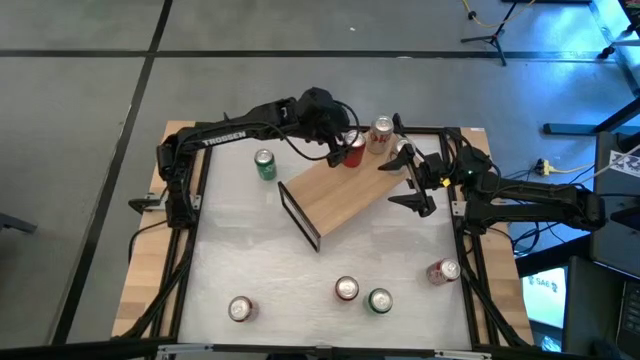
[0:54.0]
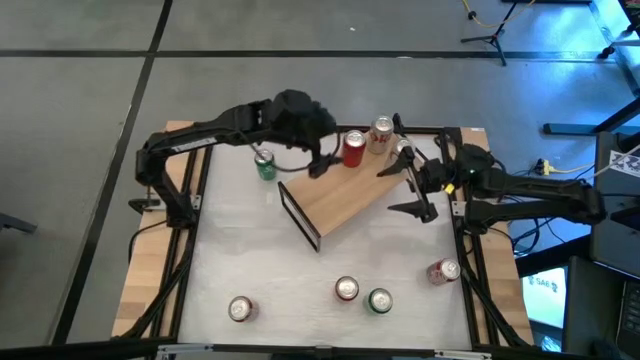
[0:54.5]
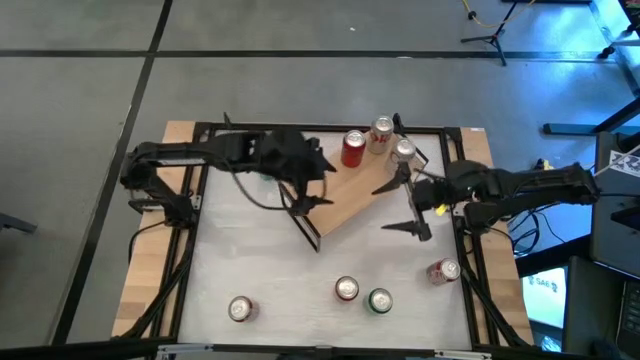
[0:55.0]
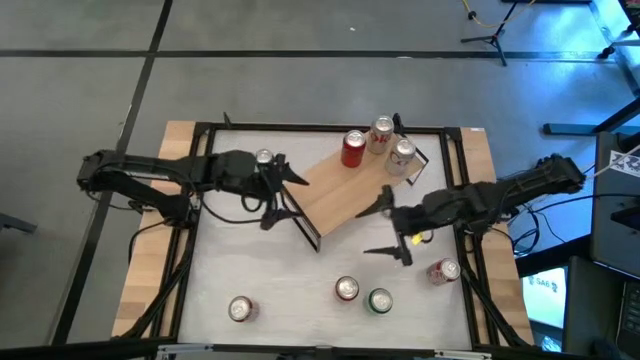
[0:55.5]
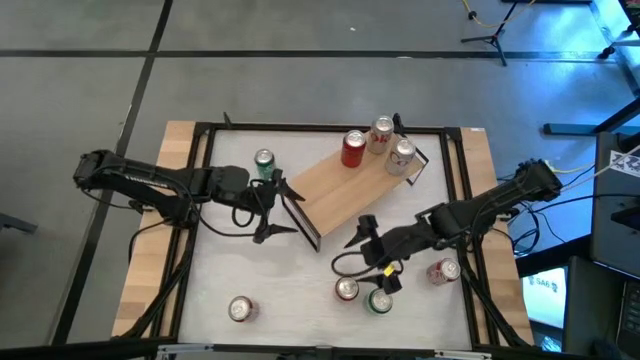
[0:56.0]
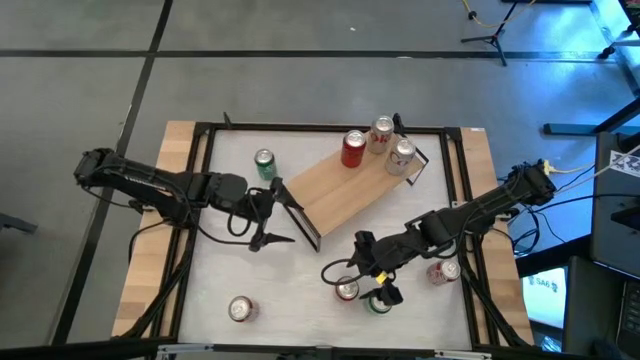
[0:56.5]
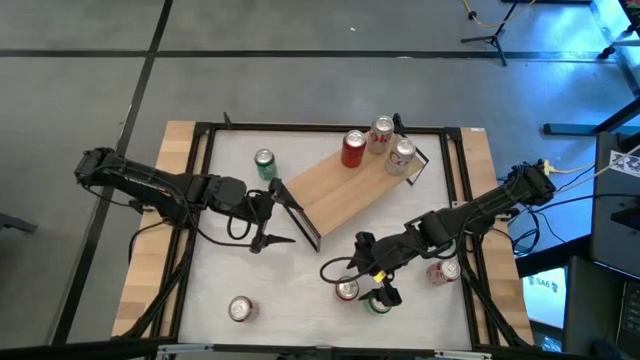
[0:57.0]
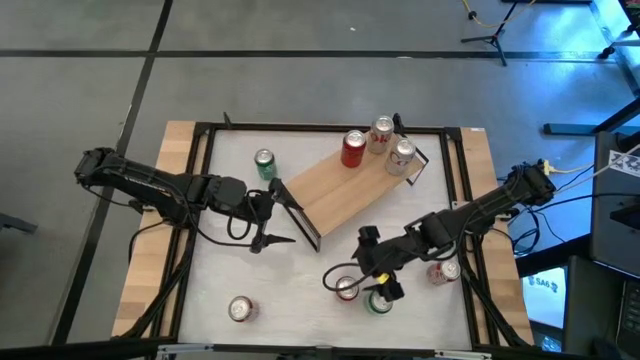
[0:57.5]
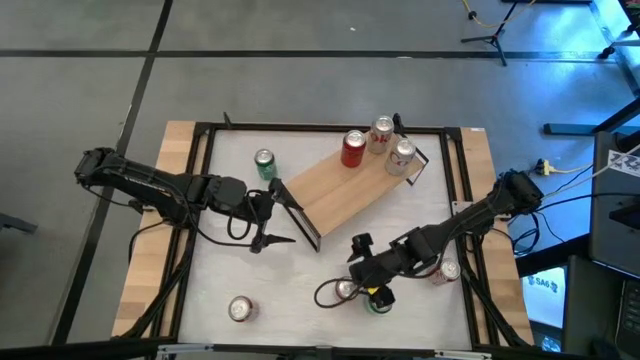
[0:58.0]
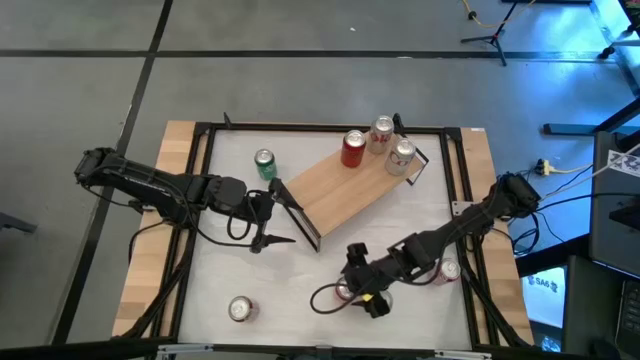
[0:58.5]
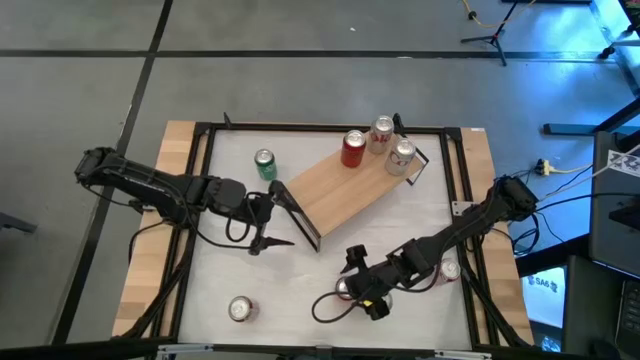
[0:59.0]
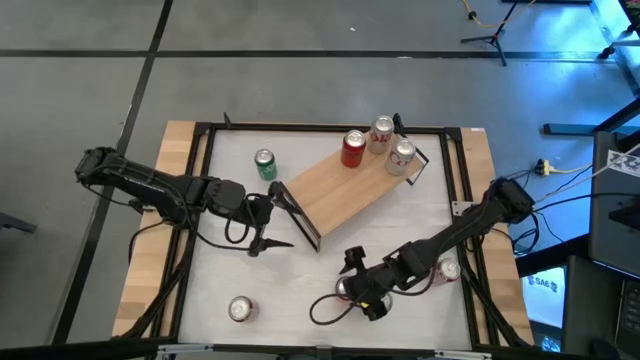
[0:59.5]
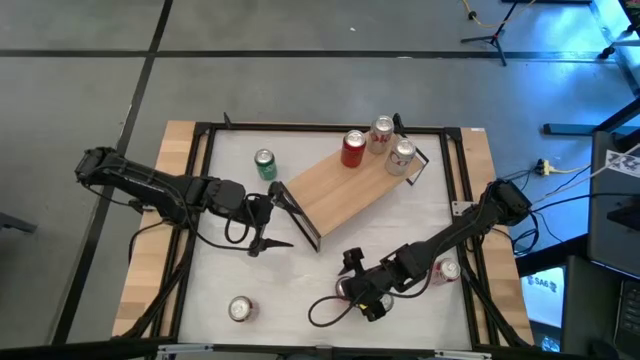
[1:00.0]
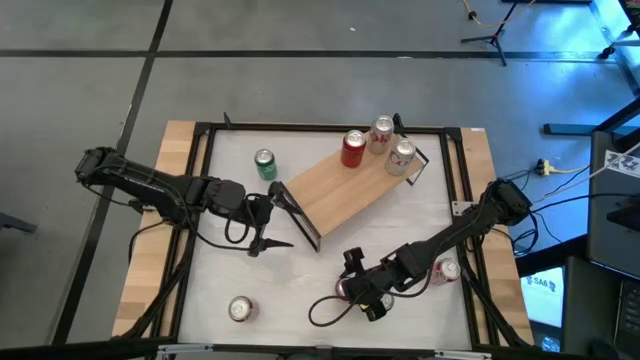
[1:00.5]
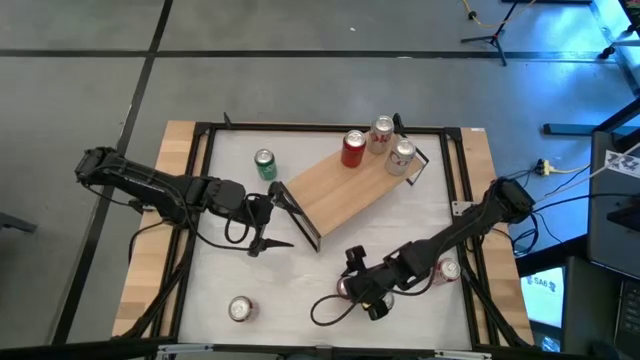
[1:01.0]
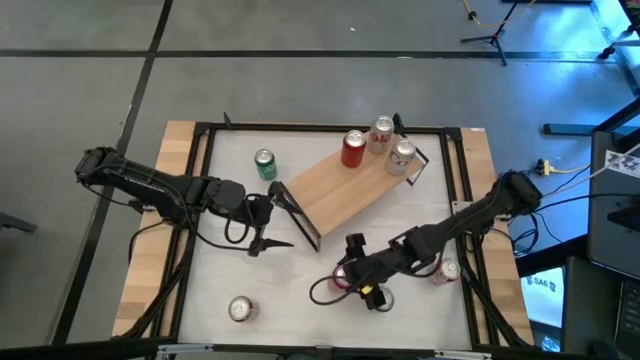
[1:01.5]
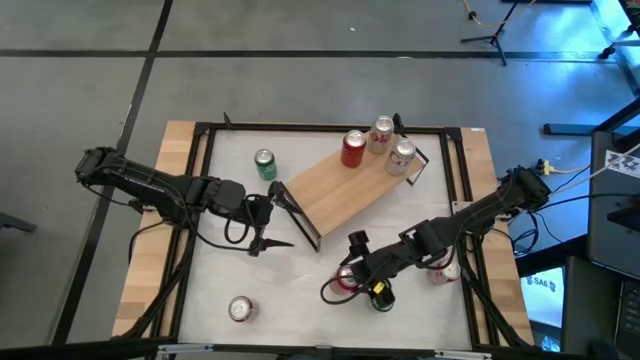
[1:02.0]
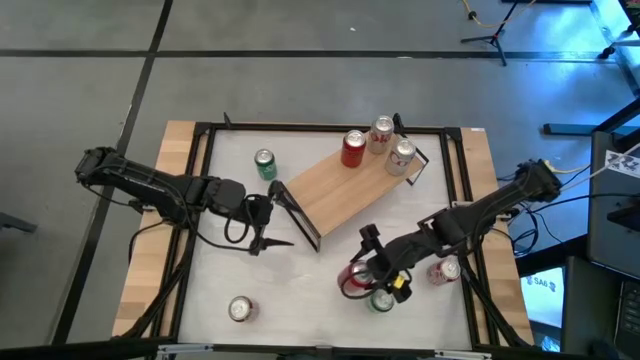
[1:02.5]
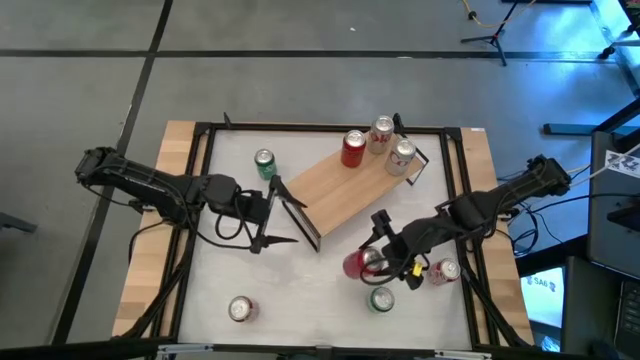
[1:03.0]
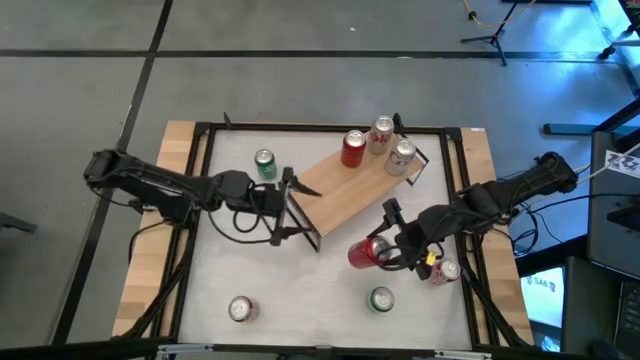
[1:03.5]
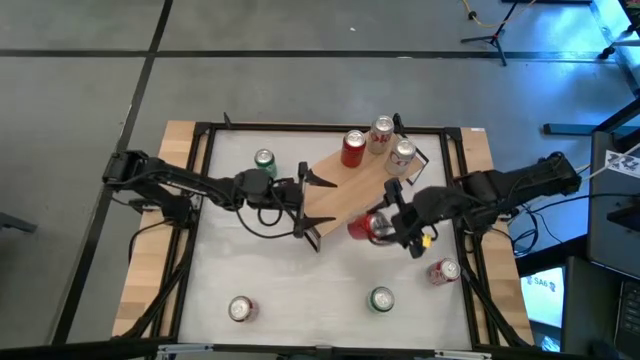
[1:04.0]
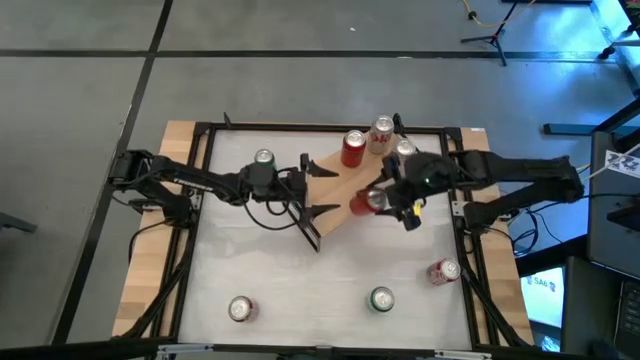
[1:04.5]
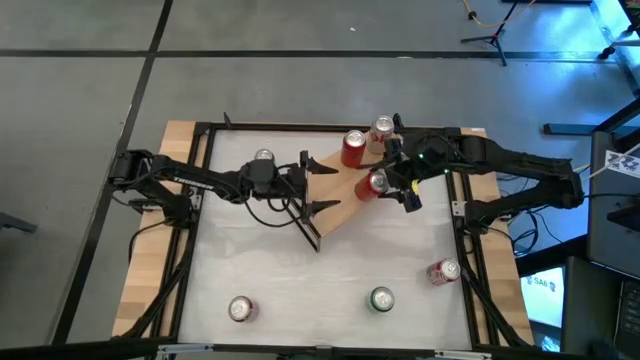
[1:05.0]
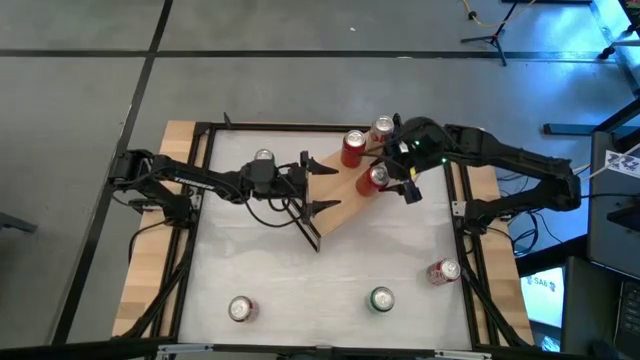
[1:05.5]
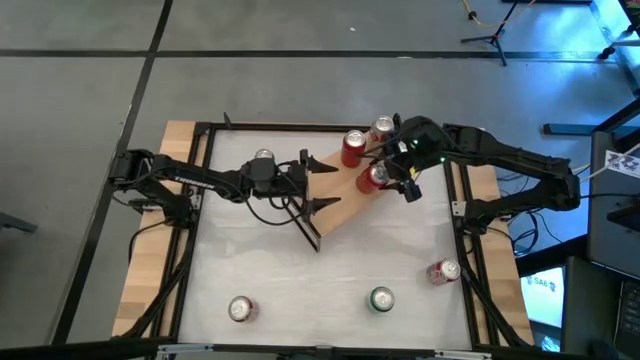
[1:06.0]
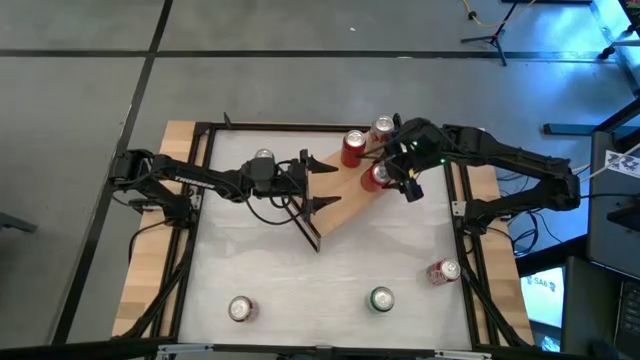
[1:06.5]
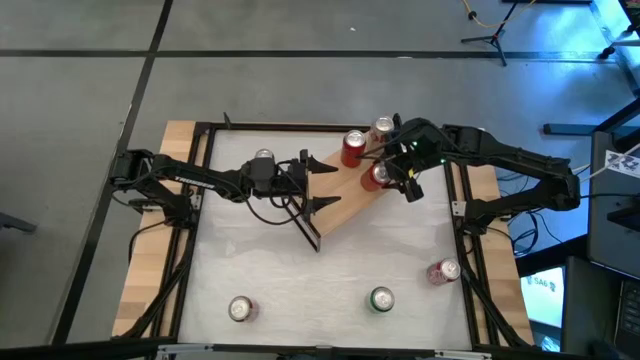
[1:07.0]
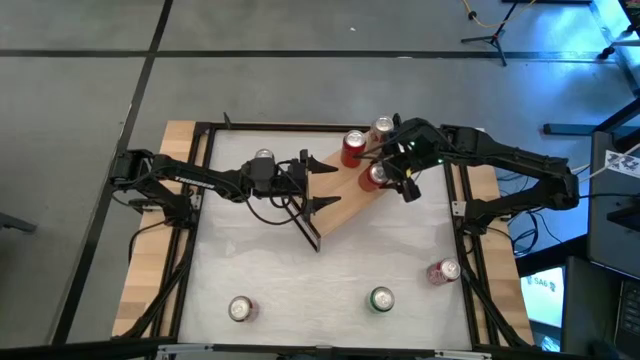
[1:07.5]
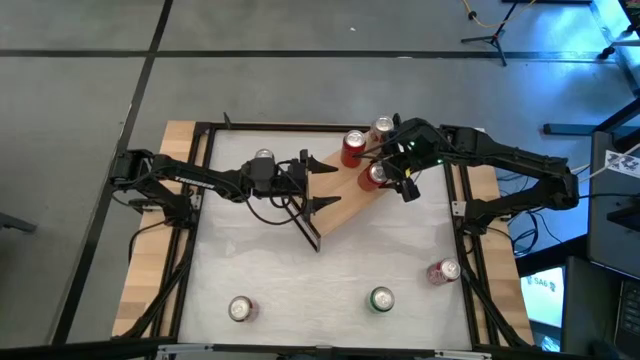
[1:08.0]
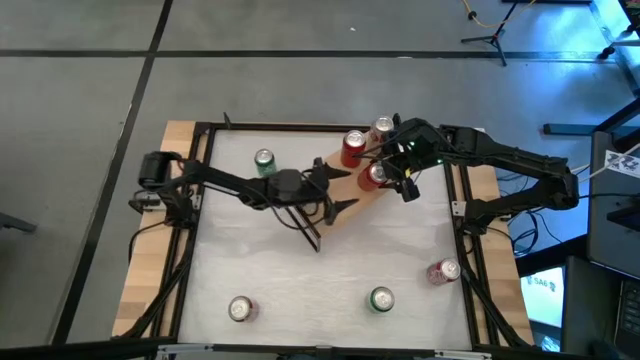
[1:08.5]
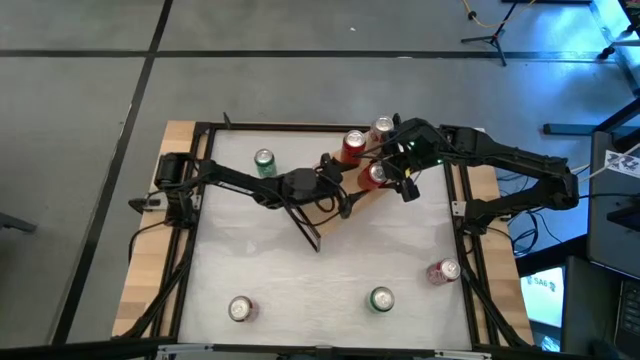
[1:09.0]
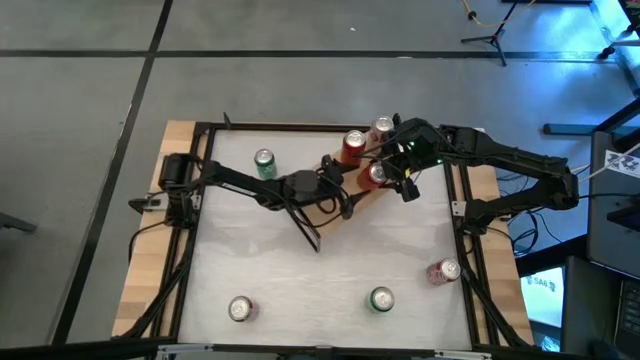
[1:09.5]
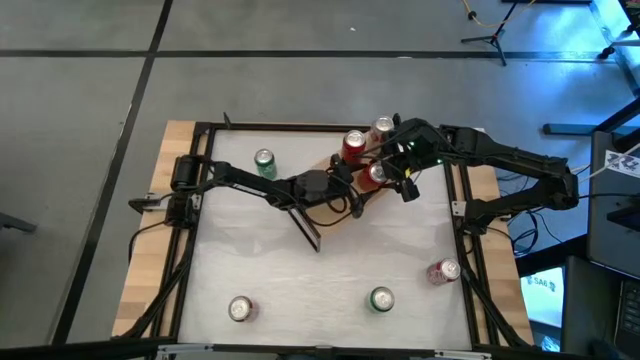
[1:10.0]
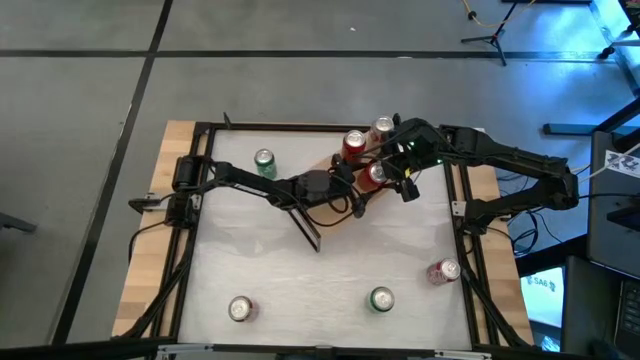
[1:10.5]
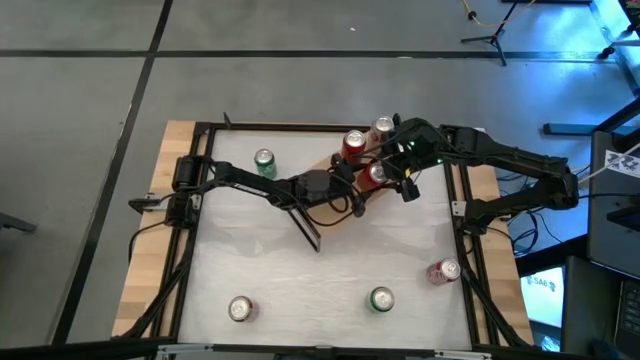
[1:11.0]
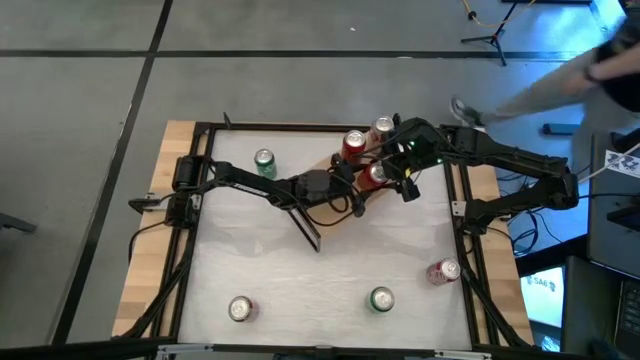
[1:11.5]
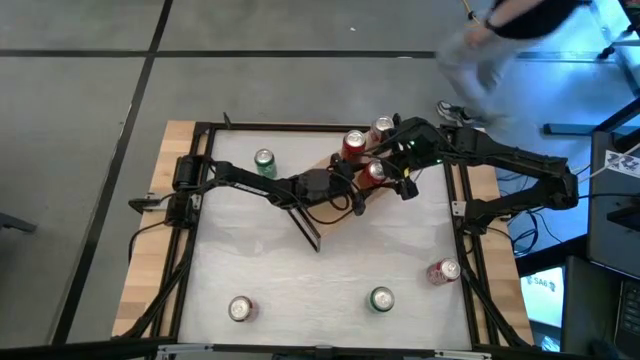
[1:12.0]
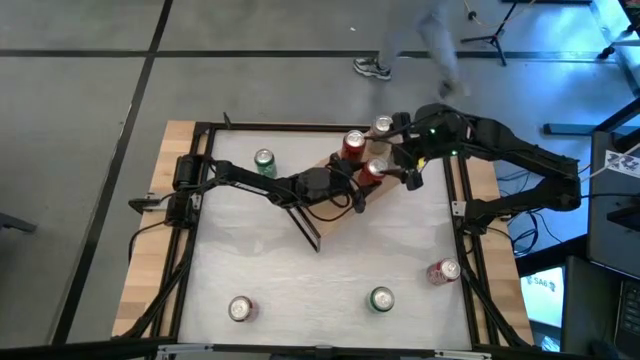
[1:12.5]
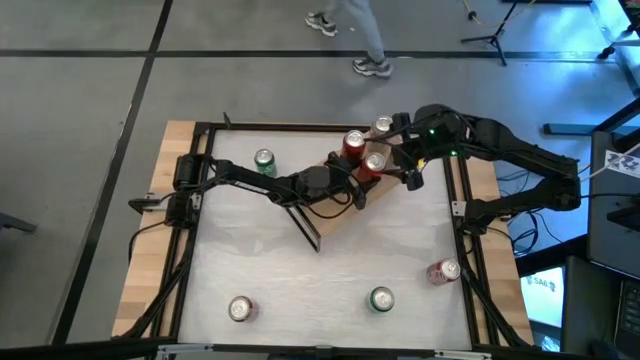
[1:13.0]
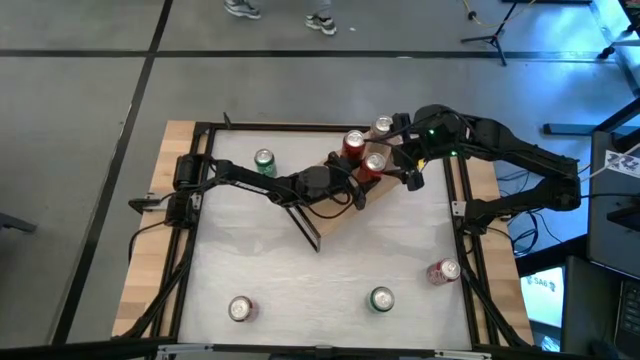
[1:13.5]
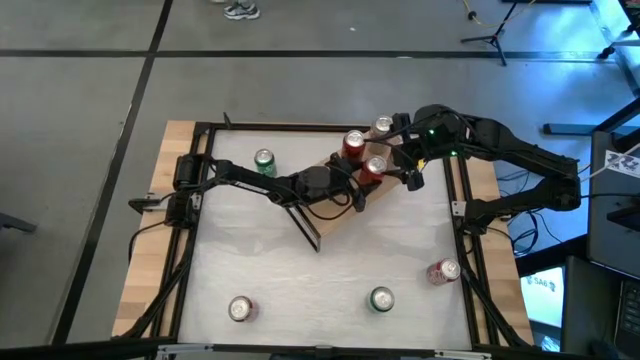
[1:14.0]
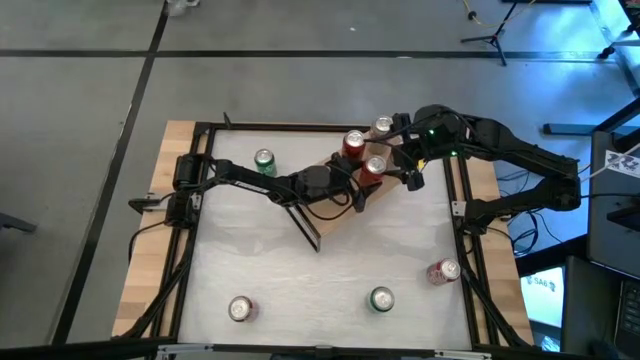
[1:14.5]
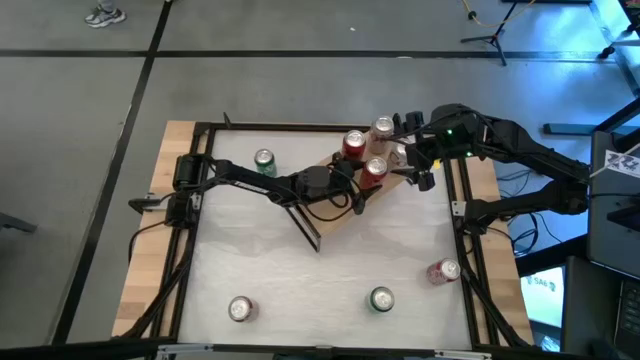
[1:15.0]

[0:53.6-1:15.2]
Task: Place canned beverage on shelf
Put the red and black soda can on the shelf aligned with the other red and black soda can
